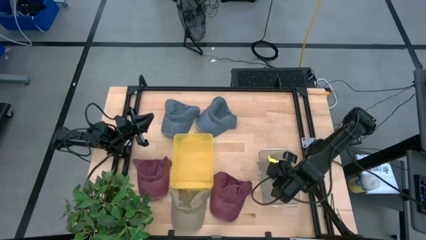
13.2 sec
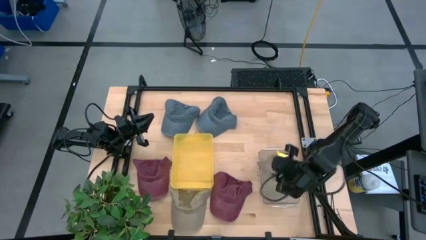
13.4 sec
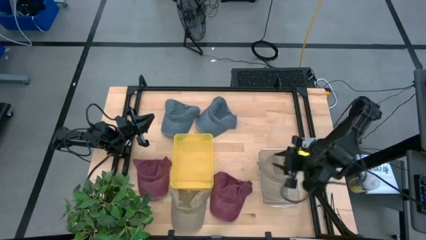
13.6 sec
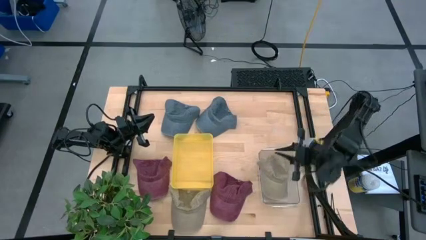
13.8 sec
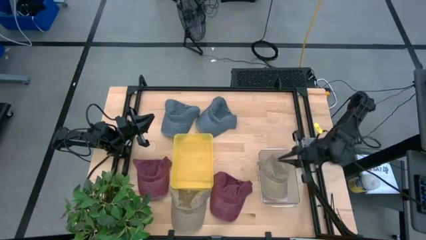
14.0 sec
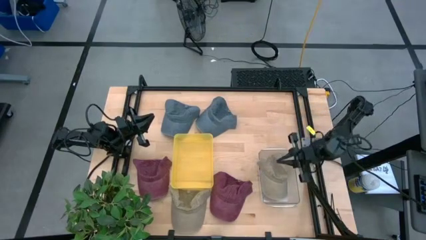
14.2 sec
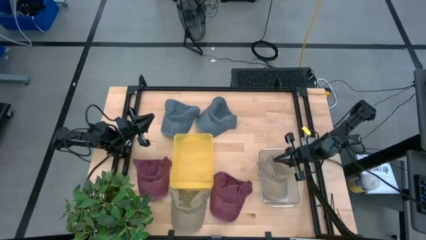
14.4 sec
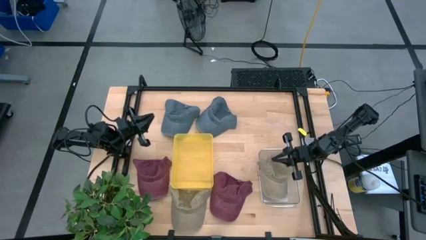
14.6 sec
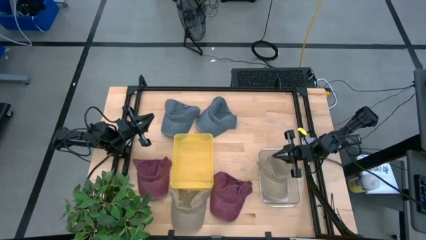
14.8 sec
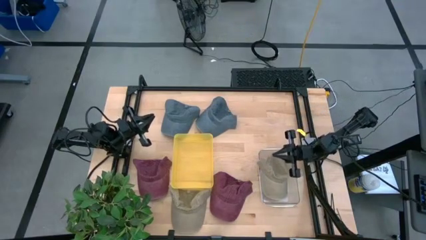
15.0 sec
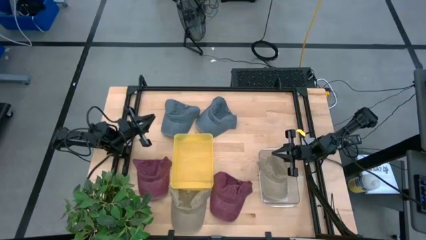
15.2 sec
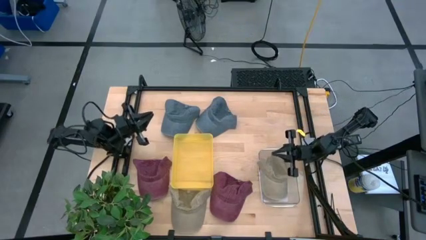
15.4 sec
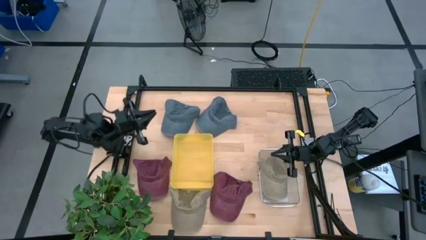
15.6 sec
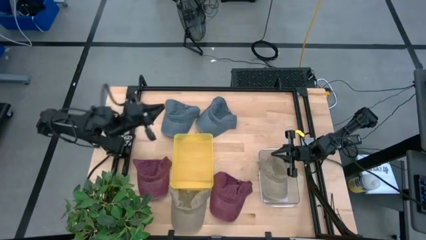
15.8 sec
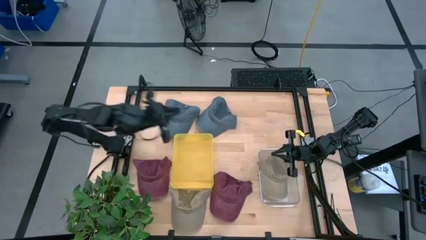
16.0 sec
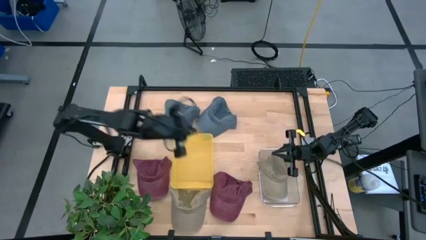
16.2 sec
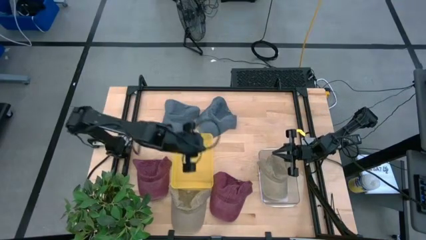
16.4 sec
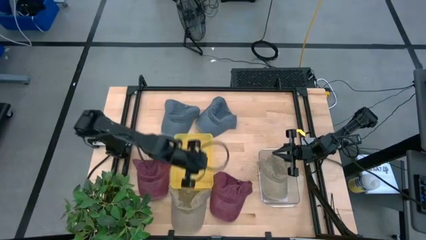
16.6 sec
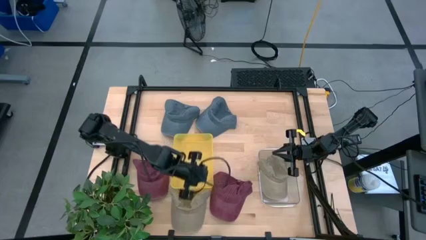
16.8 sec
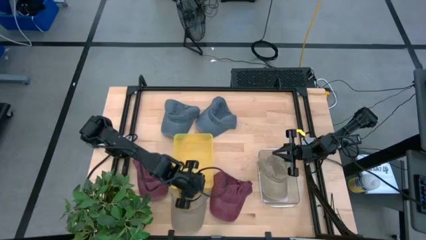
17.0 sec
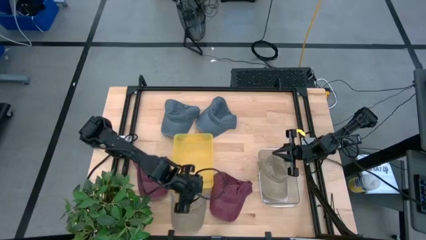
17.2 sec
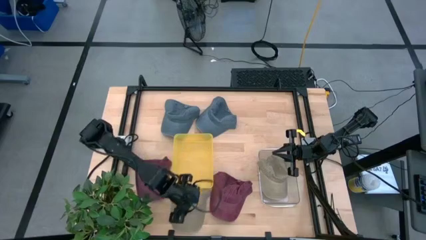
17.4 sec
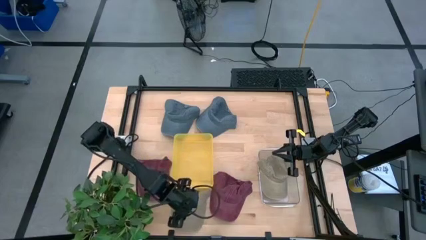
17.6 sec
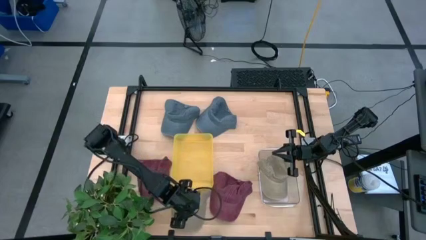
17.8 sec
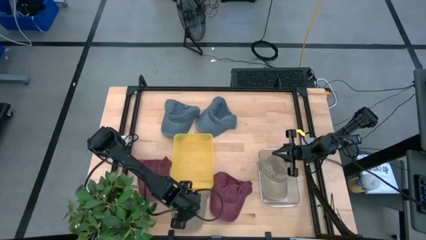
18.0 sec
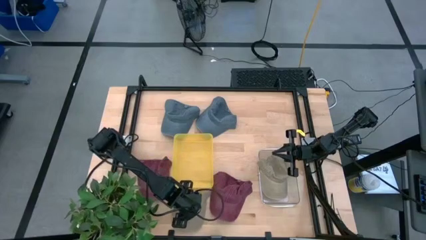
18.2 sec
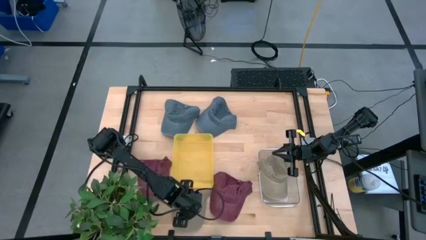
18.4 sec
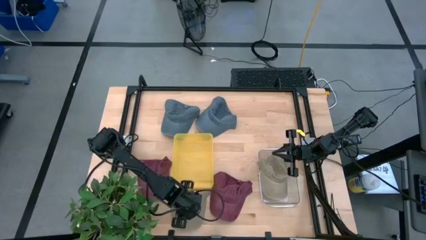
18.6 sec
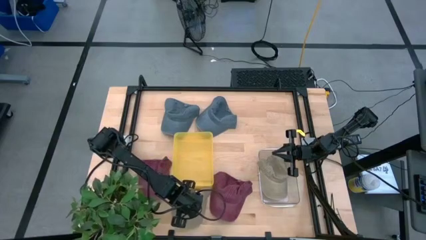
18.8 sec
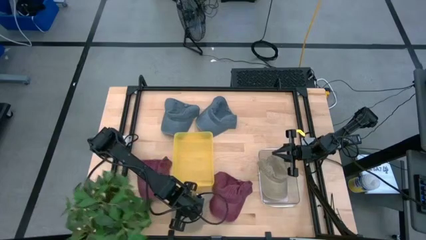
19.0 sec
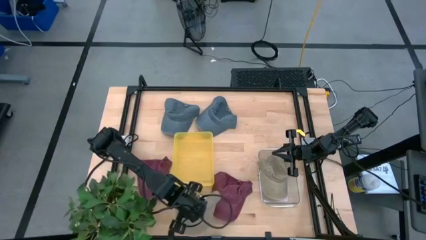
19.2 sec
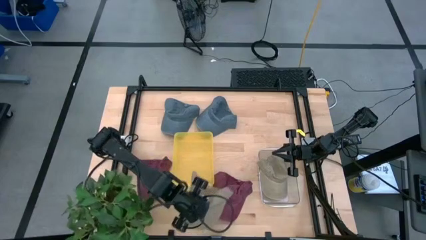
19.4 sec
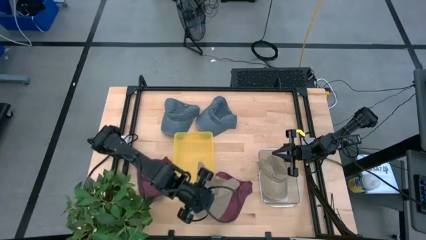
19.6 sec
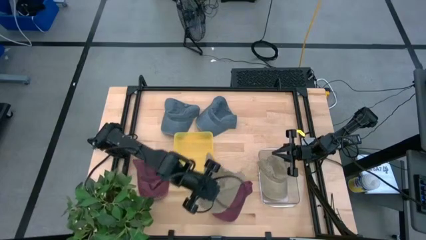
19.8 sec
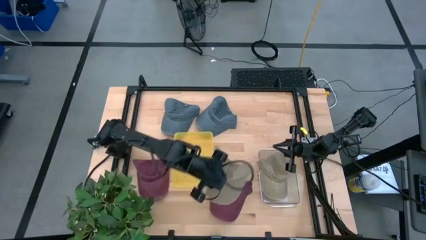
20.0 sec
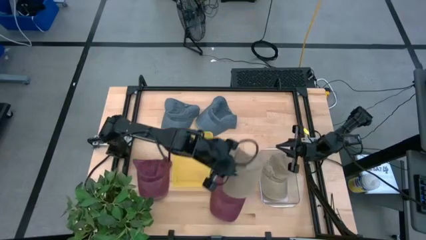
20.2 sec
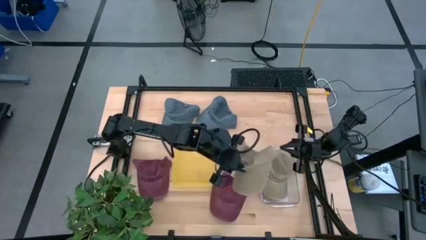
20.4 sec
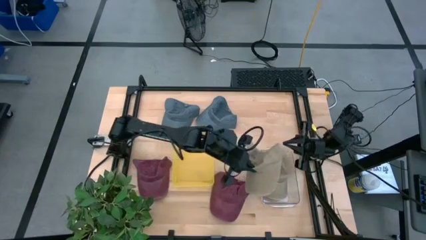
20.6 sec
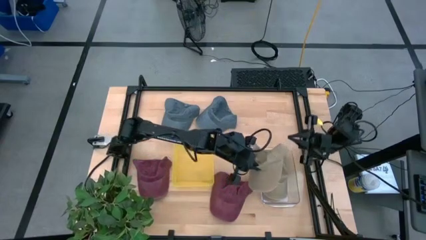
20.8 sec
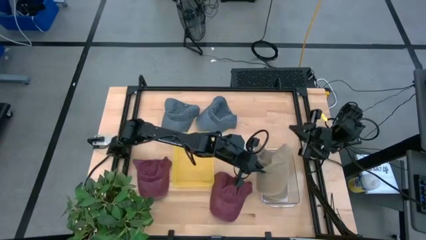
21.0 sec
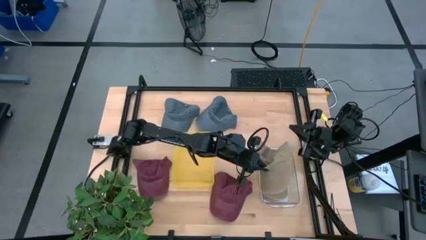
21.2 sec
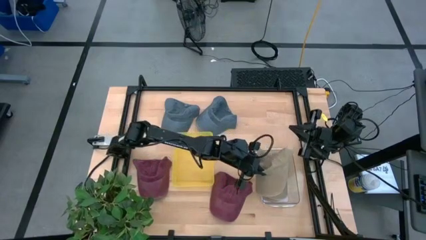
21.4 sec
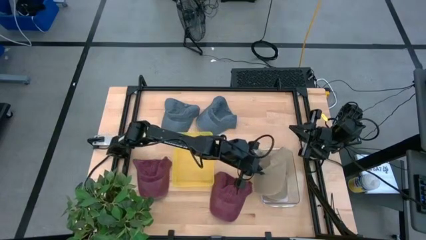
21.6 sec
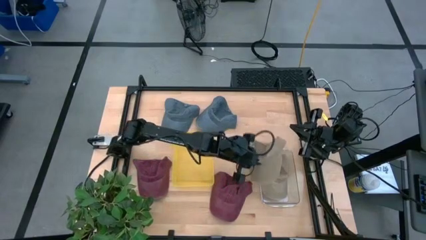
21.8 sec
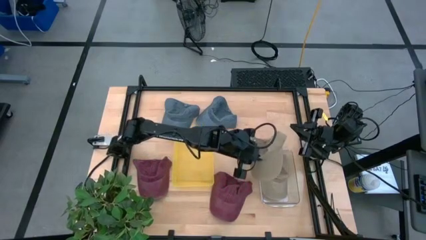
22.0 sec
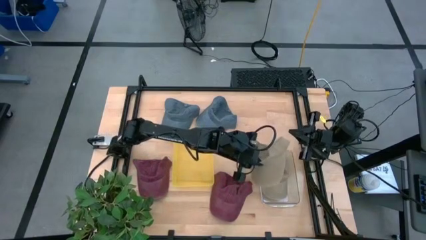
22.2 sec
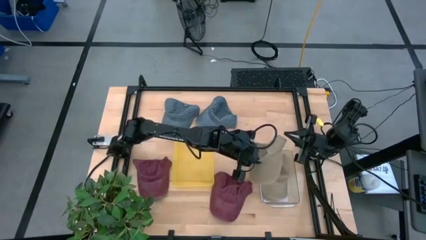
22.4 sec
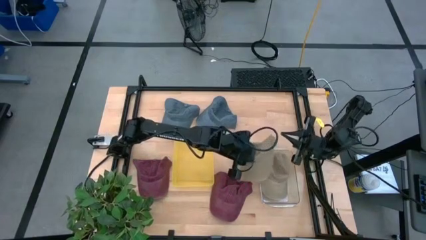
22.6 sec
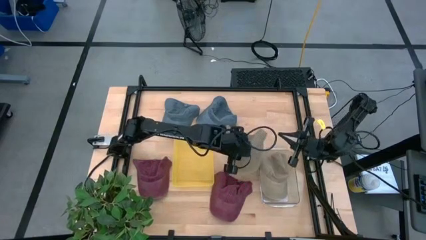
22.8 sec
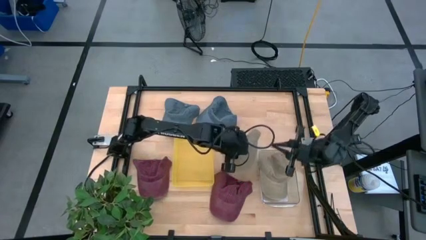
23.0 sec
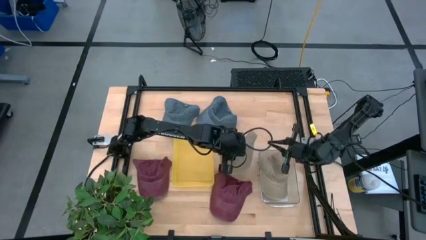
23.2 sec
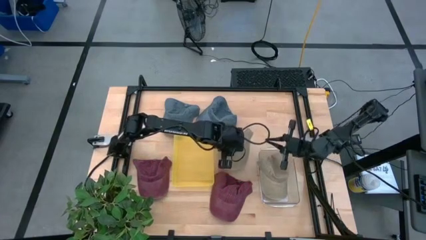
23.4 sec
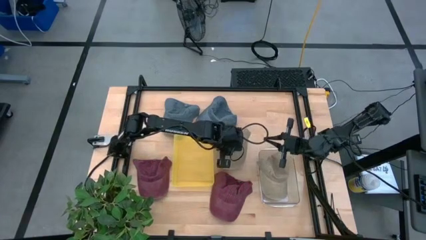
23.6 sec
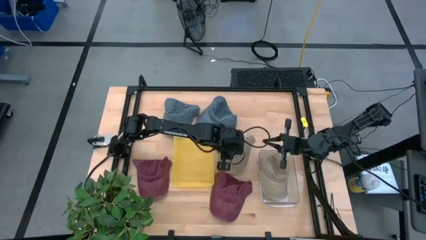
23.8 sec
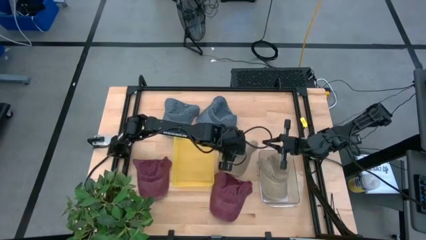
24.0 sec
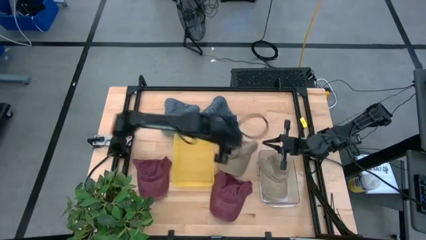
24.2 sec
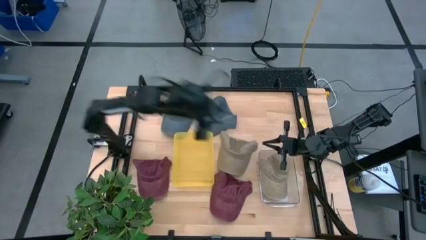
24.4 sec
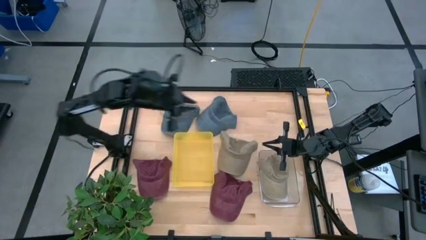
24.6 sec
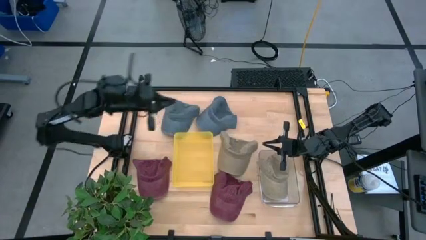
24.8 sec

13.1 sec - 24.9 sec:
Task: Pick & Place hat
Put the brown cap into the transparent bin

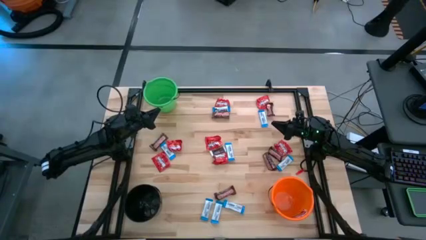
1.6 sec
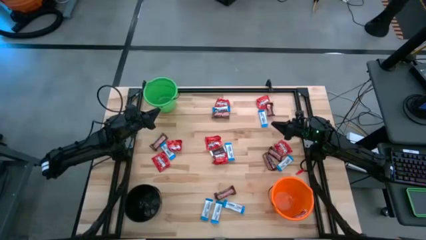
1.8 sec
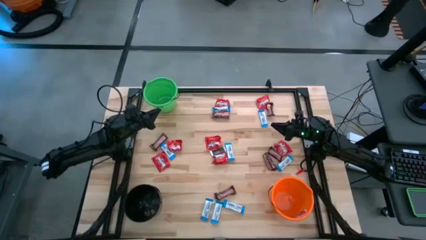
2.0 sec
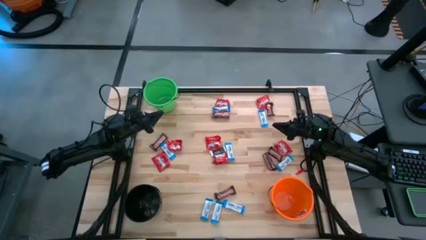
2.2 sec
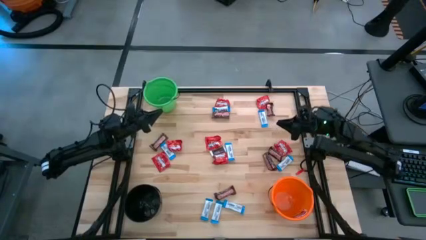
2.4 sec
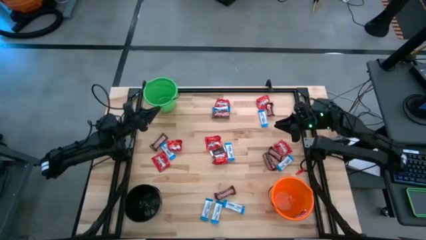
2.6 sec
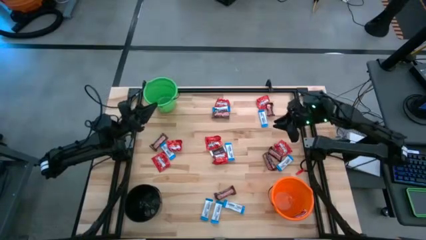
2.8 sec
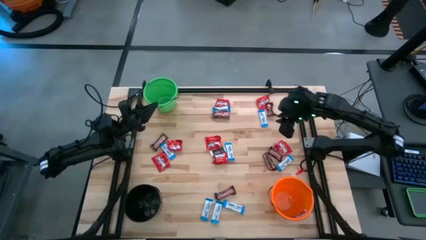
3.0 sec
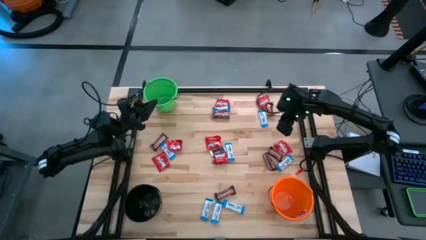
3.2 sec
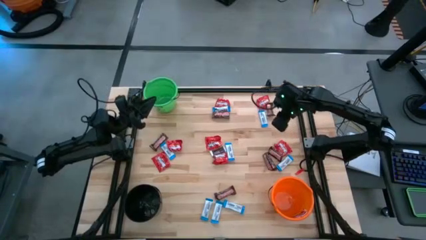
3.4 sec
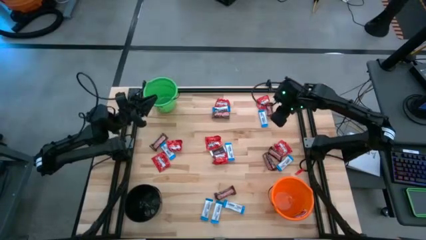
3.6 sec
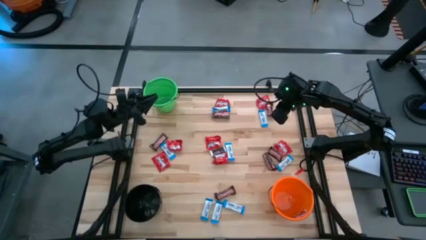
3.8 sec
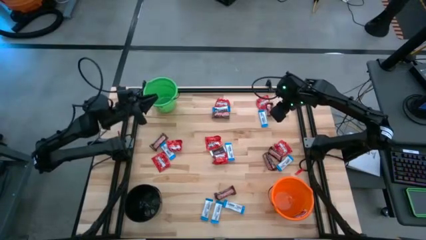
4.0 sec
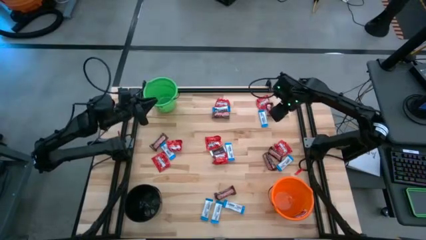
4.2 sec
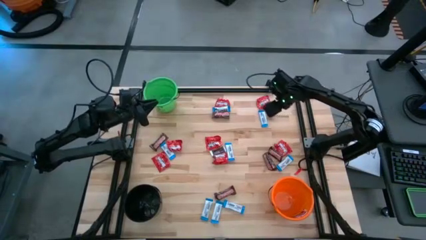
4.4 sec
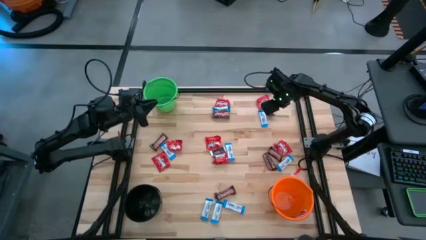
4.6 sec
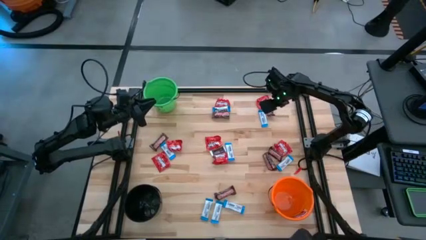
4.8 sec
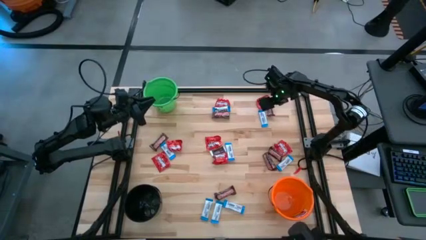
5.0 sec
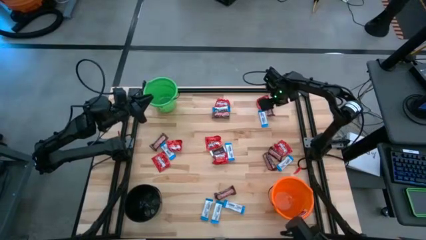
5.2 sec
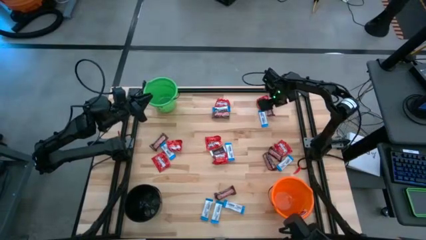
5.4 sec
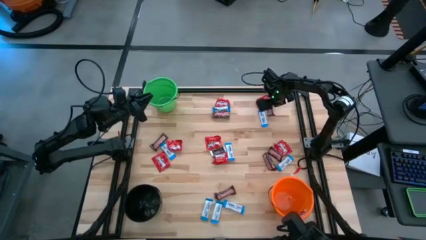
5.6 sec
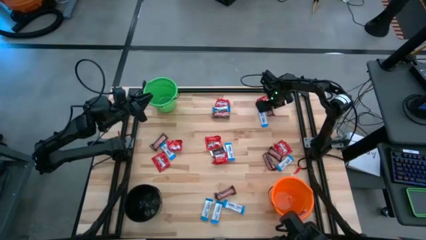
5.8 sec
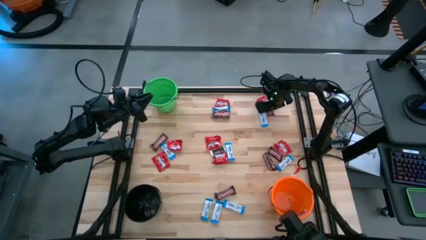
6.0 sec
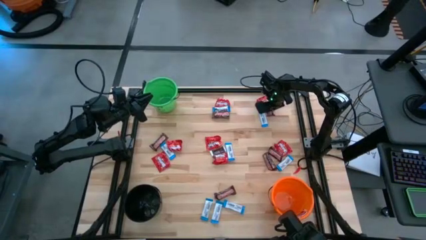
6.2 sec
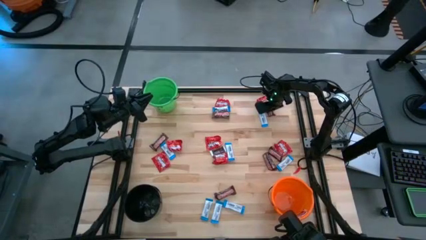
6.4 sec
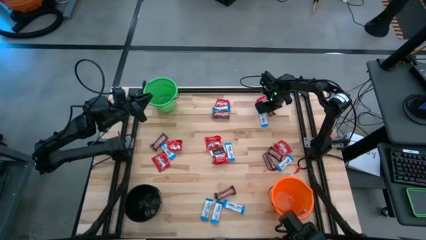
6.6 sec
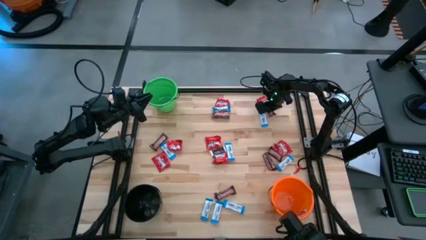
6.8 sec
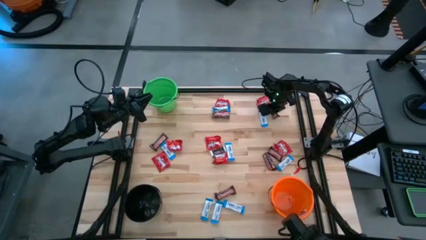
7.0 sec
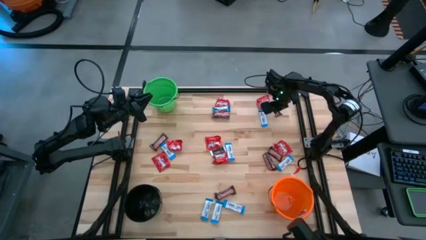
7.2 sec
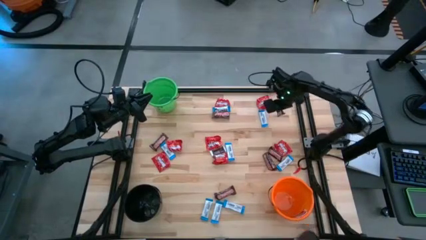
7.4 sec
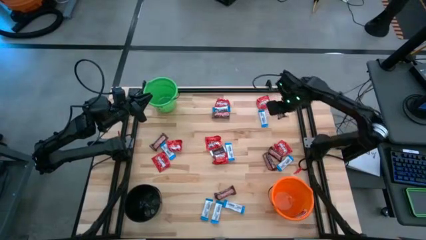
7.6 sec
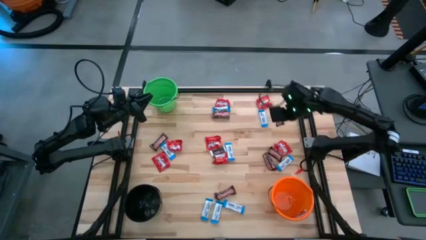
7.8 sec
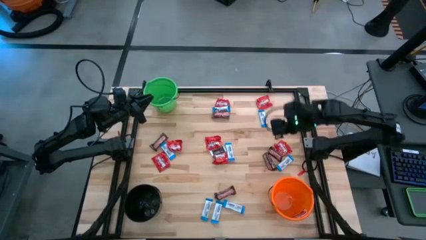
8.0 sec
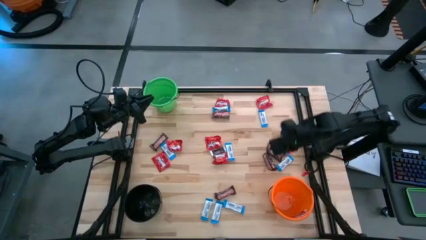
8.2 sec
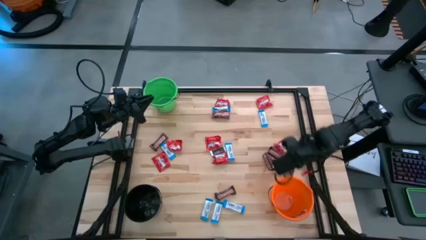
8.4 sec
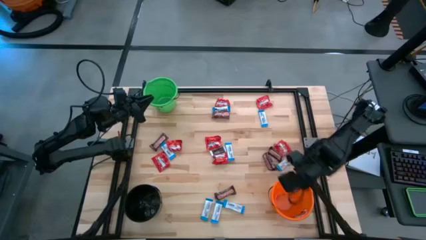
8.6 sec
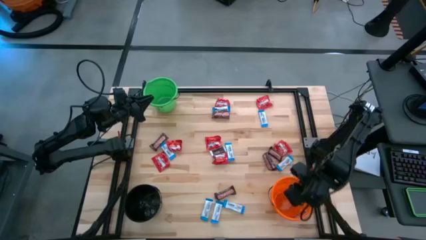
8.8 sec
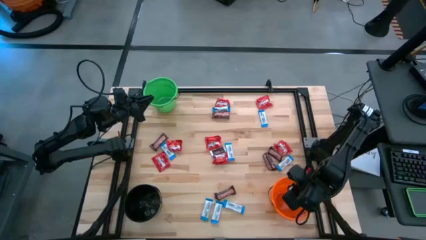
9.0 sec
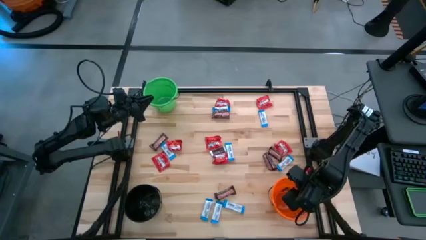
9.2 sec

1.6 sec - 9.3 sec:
Task: Sort candy
Put the brown chocolate into the orange bucket
